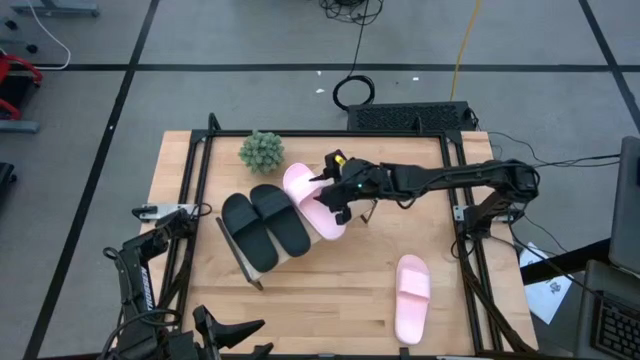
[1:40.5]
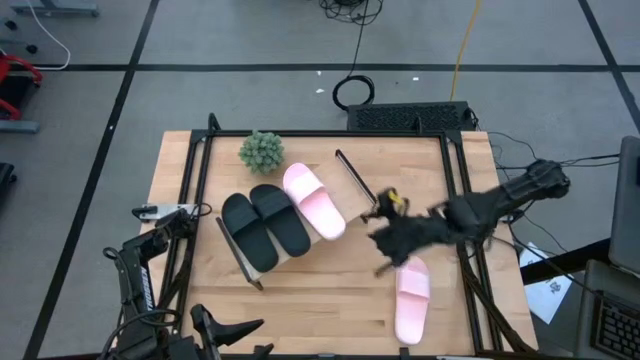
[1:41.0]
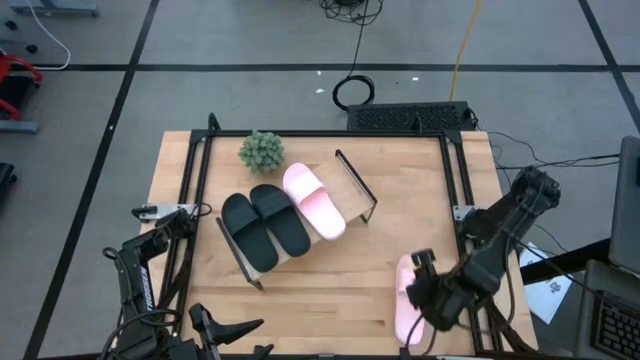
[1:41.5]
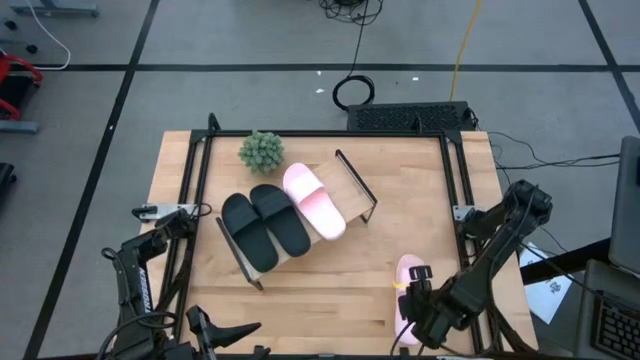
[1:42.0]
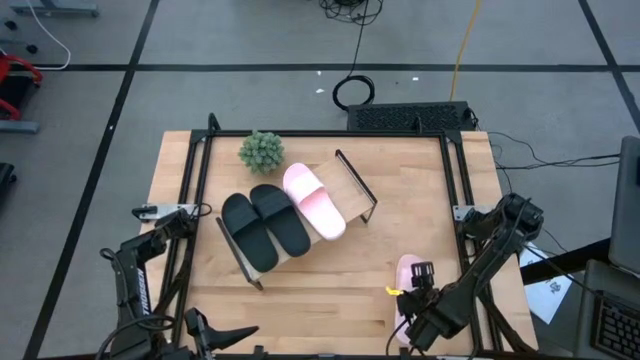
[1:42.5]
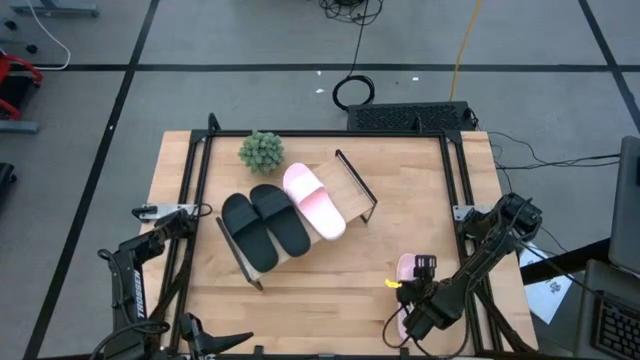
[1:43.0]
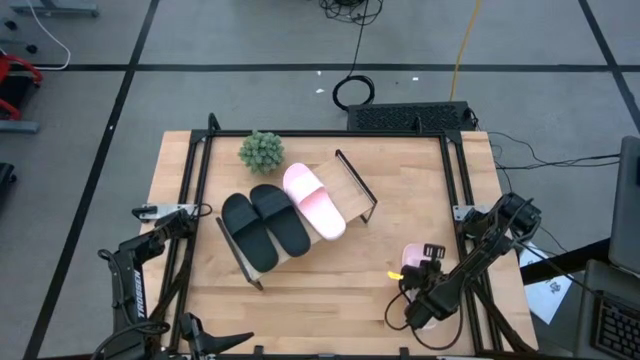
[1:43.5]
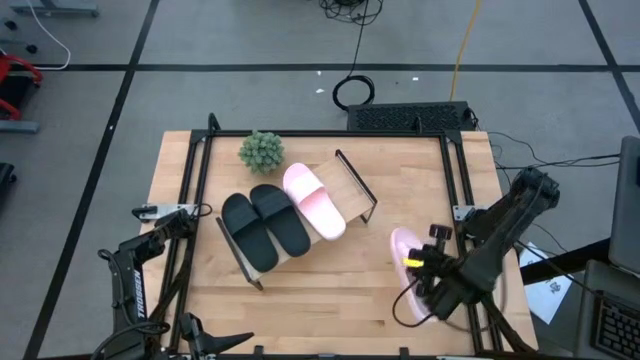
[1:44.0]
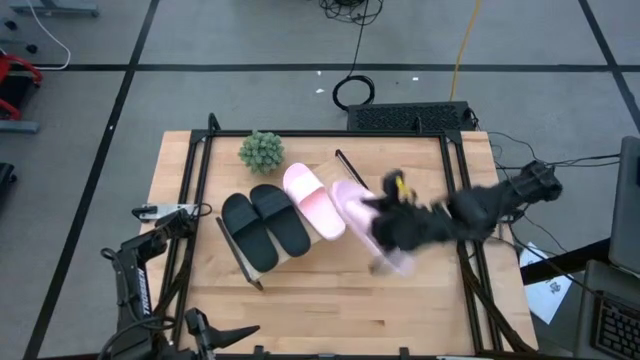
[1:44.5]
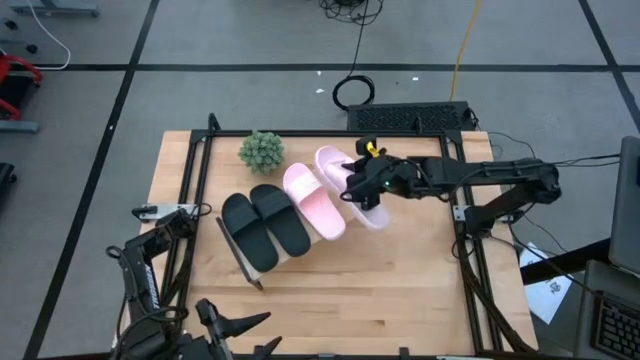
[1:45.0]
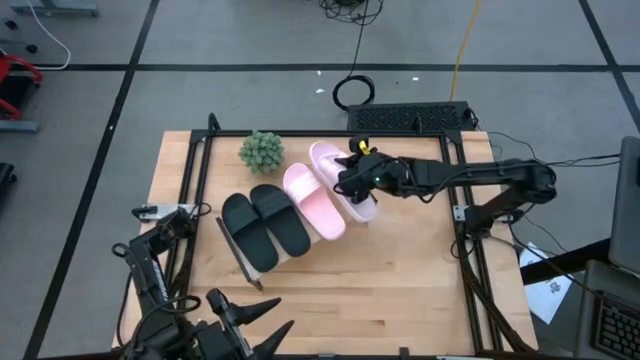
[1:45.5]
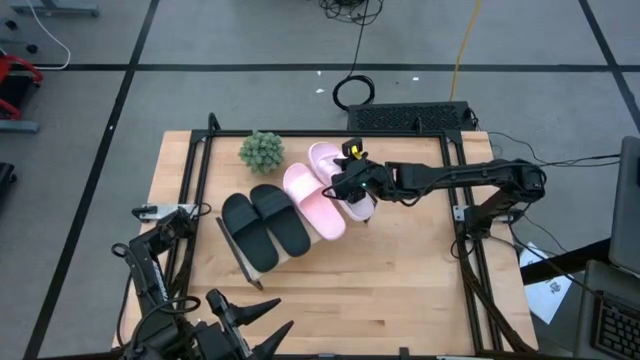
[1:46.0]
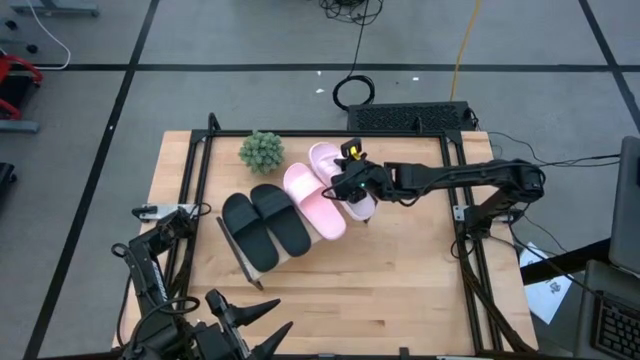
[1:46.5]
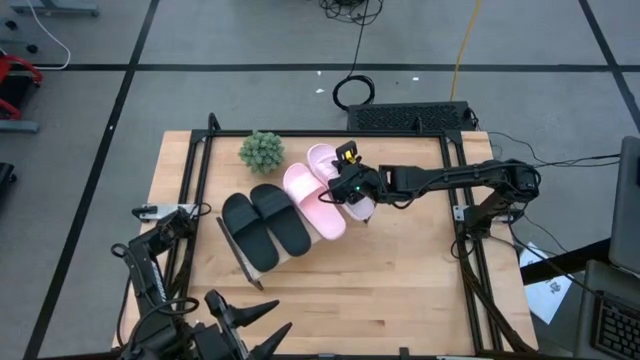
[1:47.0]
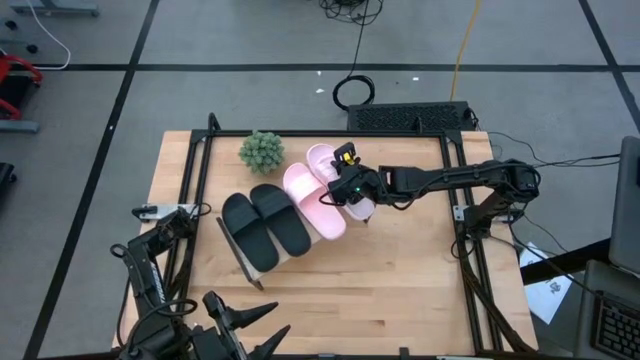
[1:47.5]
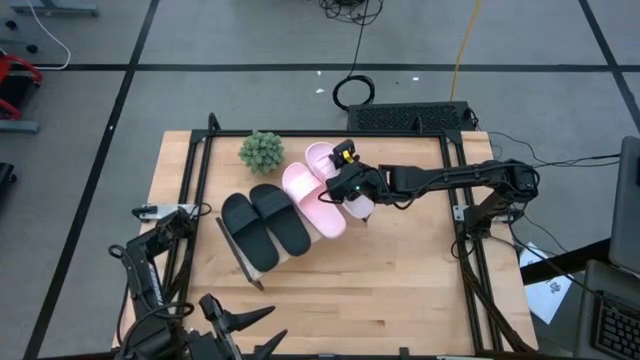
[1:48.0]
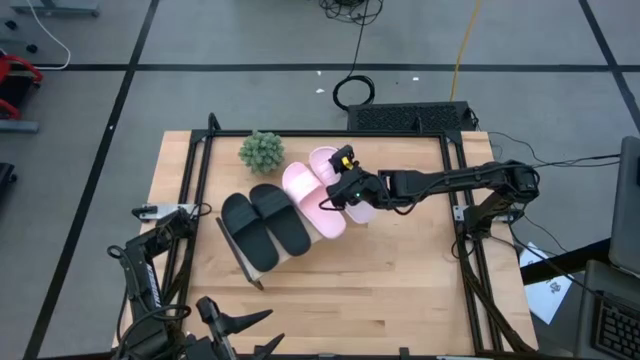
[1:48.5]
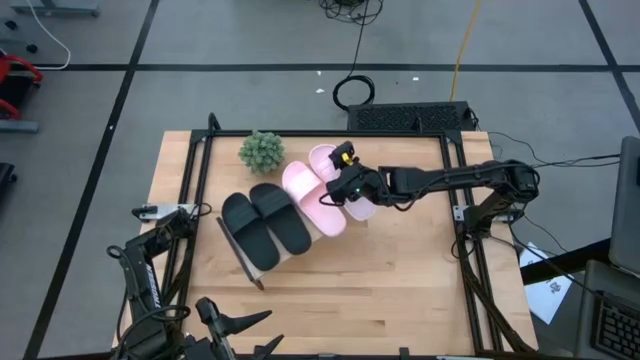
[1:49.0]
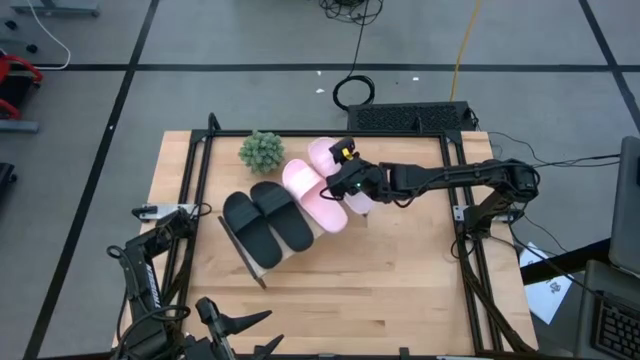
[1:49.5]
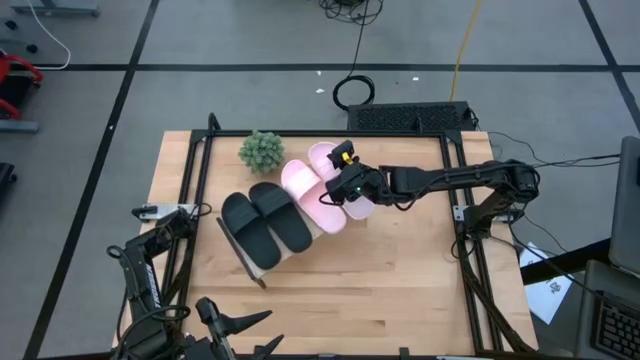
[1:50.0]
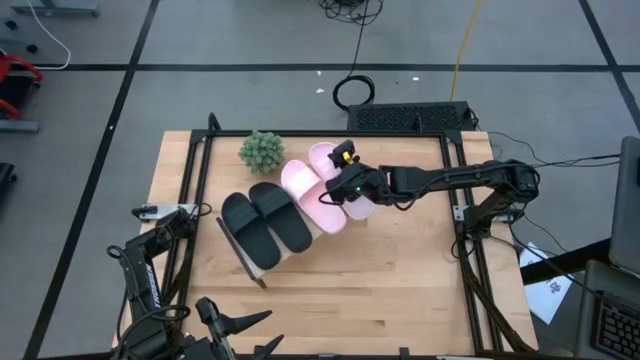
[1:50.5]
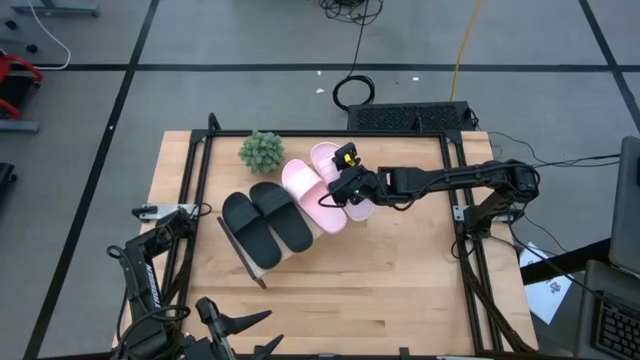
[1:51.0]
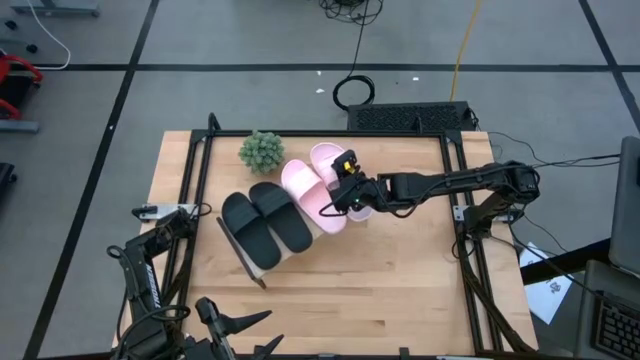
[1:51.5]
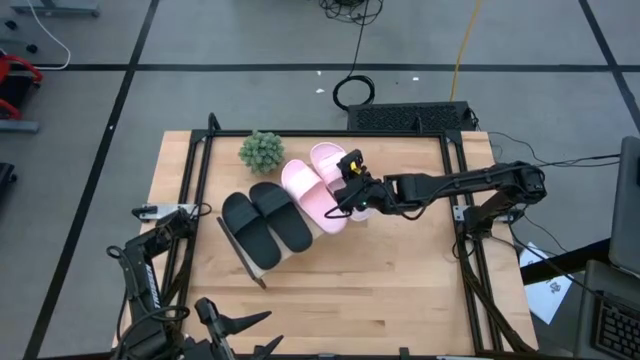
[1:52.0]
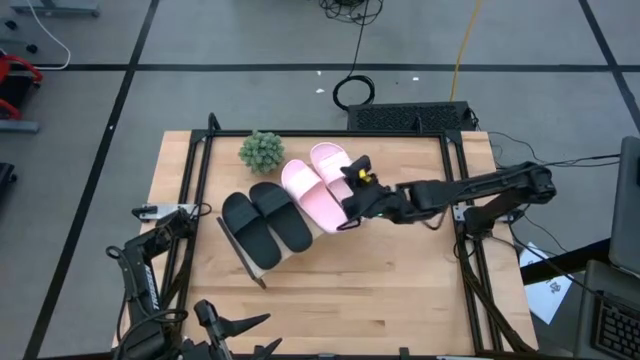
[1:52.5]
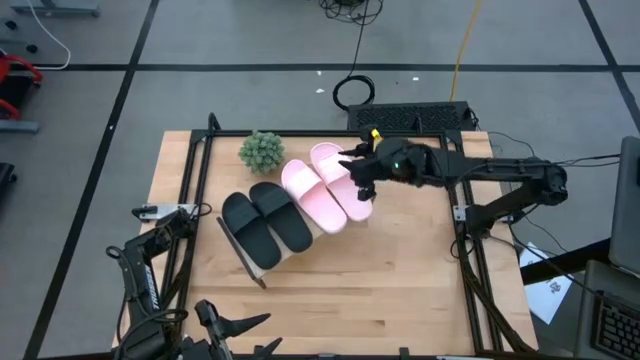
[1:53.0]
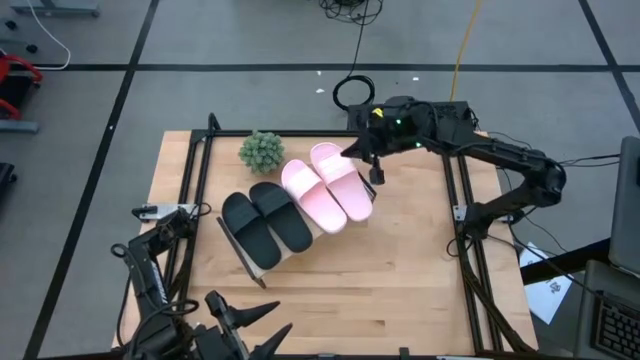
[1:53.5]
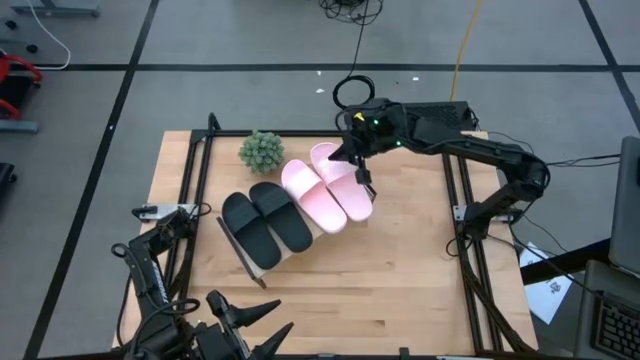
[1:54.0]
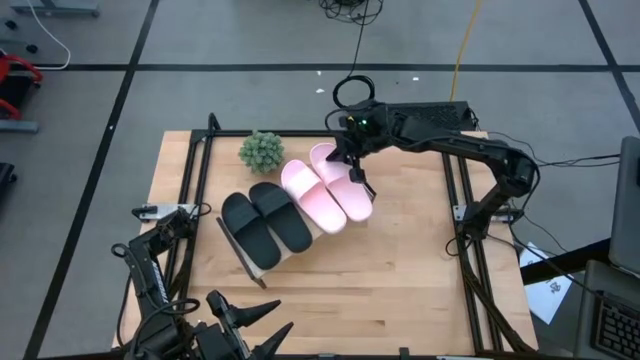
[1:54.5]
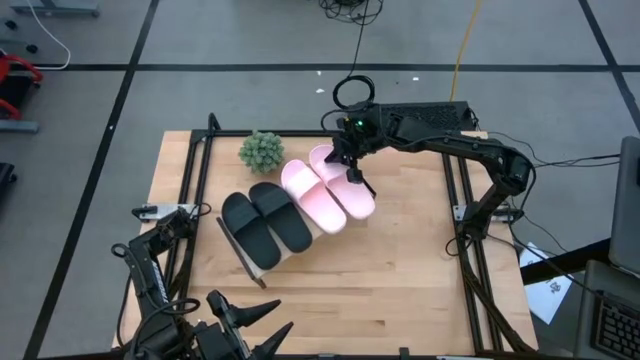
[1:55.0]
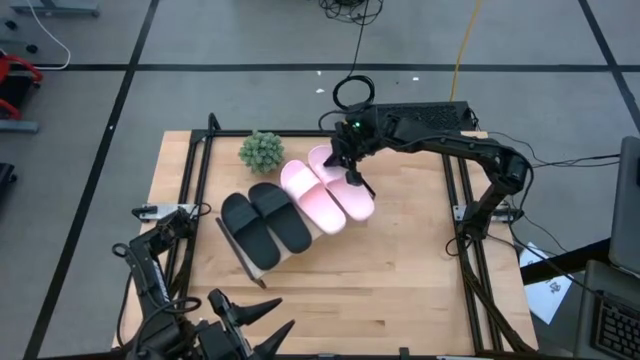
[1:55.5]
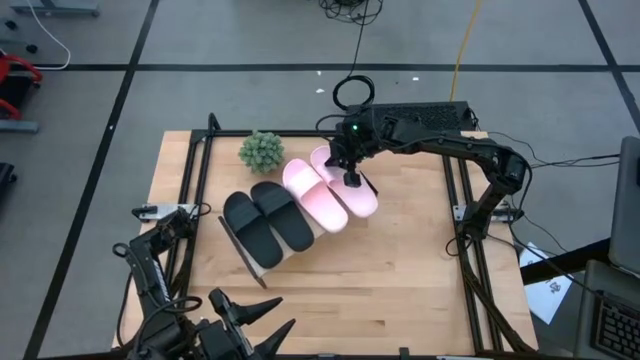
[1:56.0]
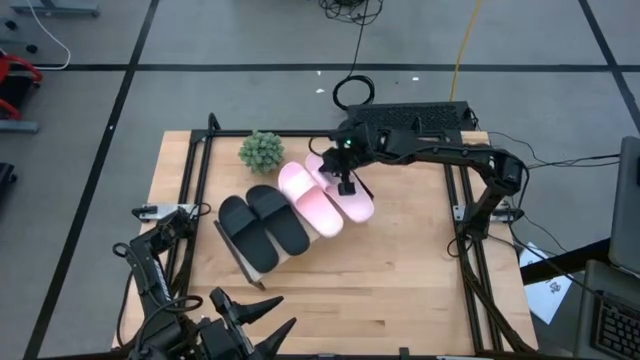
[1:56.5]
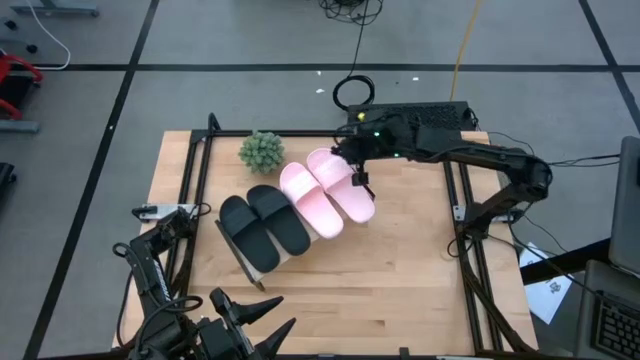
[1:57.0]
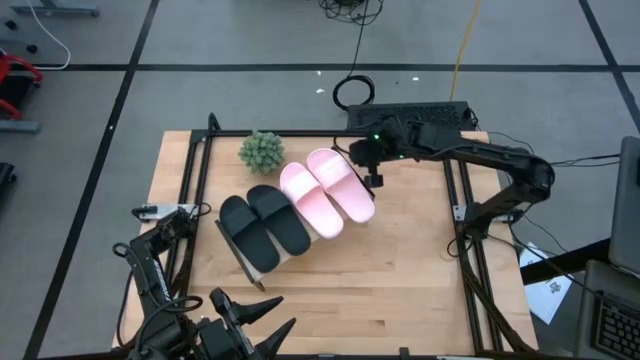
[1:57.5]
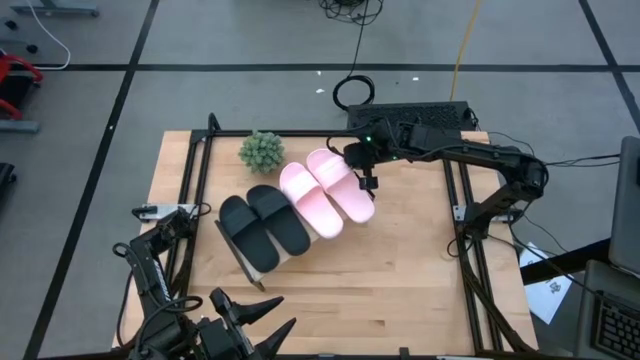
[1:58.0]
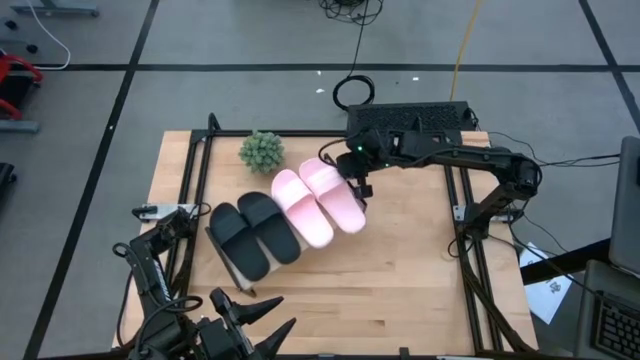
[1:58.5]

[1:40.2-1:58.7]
Task: Pick and place slides into the shelf
Put the pink slide on the shelf

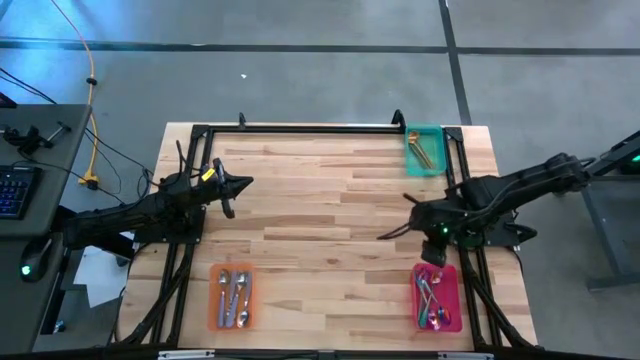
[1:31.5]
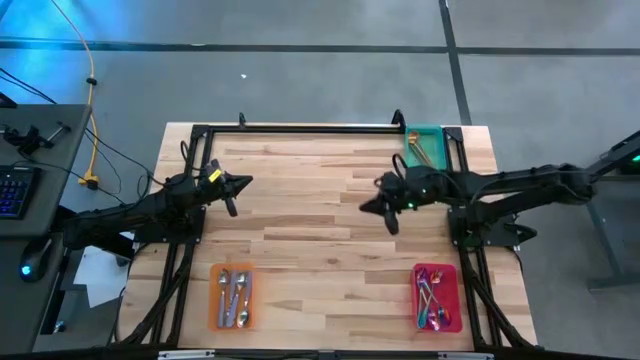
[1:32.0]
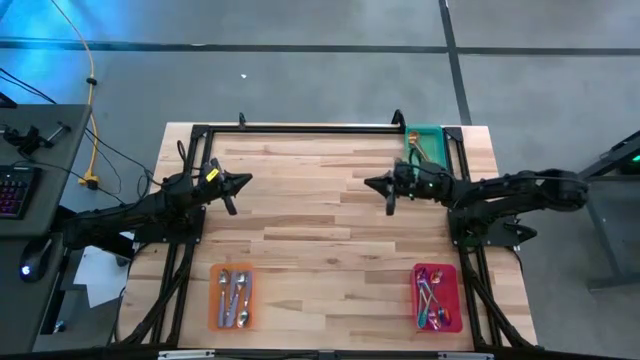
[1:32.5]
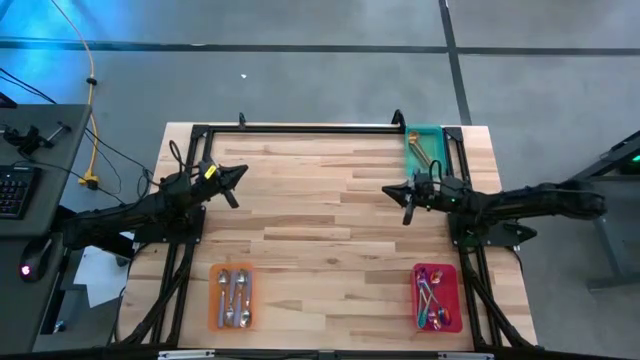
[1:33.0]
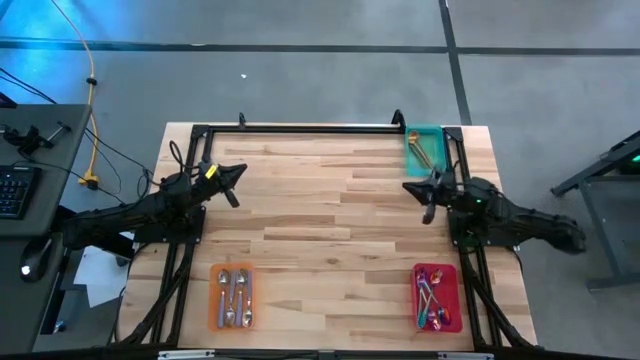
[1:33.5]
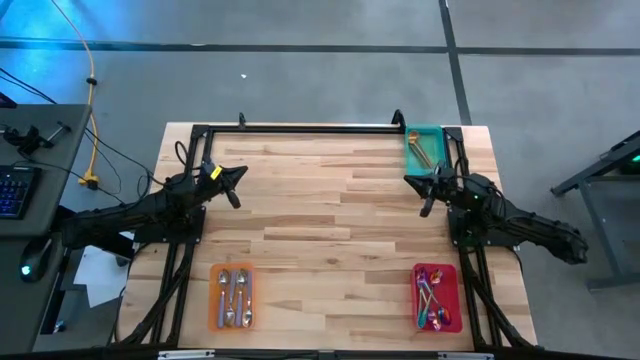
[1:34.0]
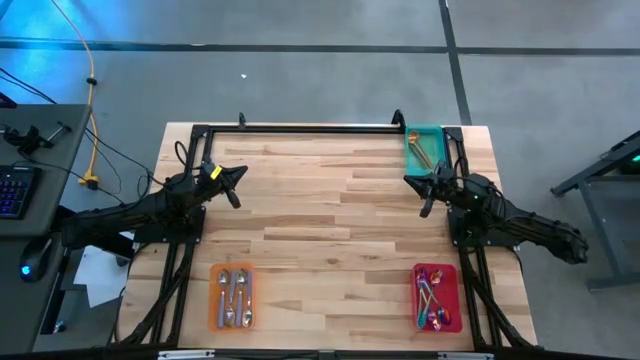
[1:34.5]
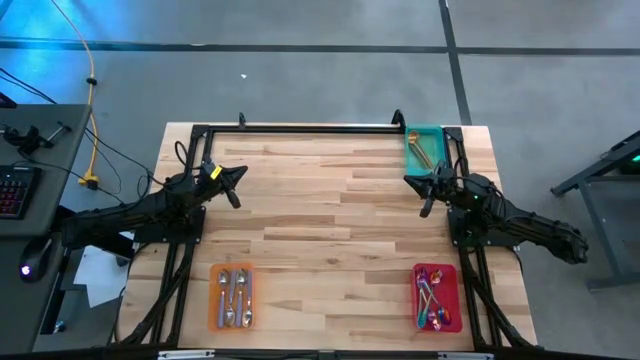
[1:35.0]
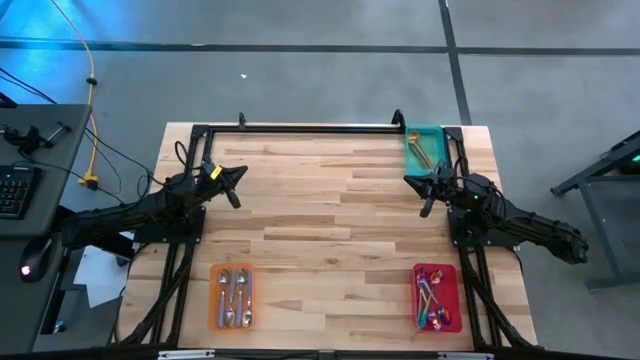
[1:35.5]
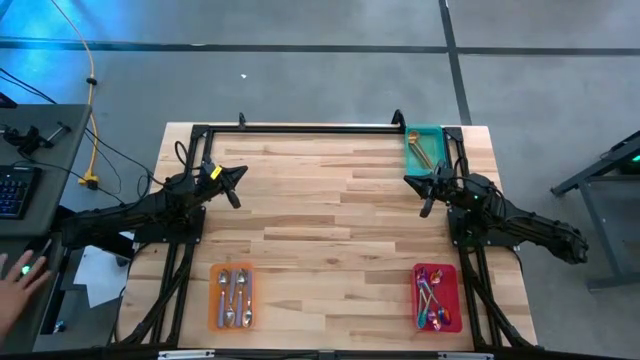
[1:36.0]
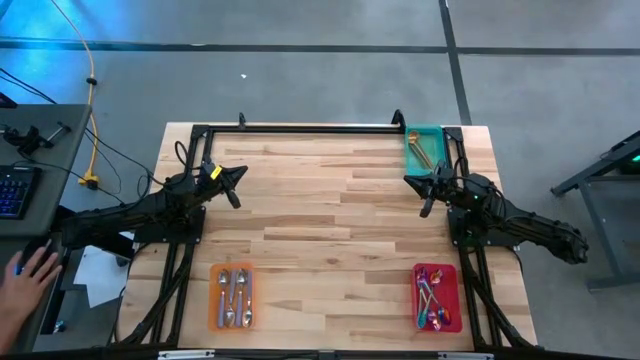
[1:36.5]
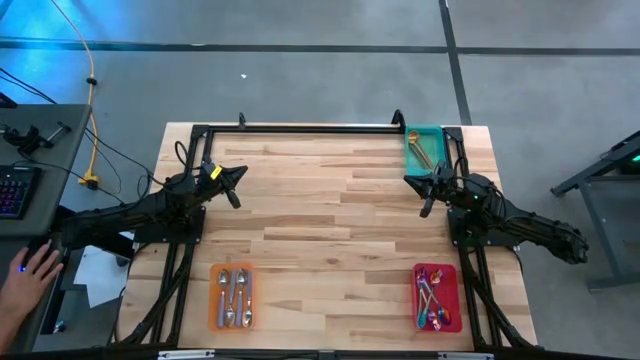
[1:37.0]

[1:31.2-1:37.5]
Task: Sort silverware by color (type)
Return to Home Position
